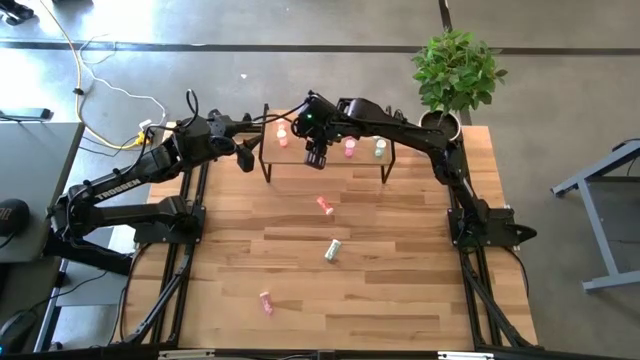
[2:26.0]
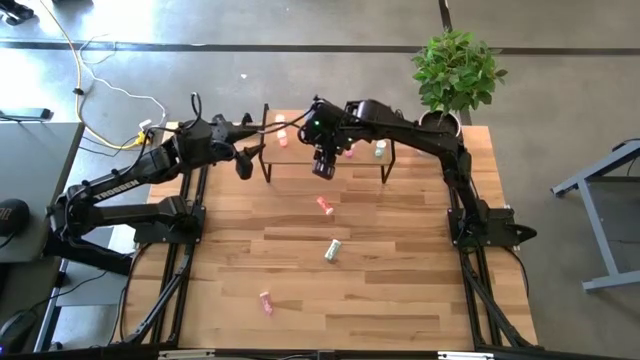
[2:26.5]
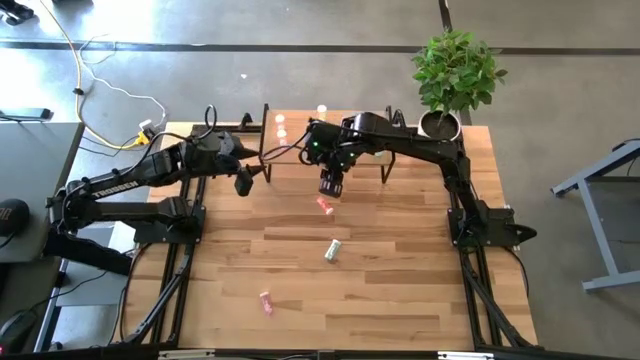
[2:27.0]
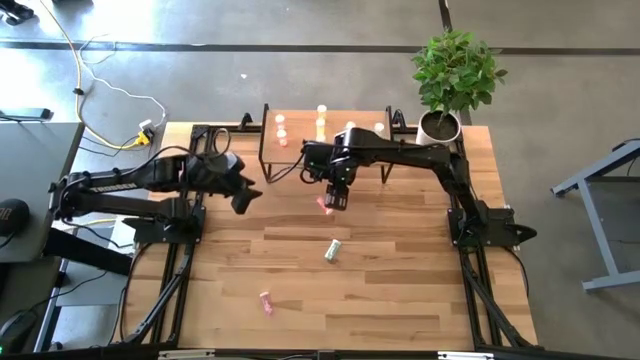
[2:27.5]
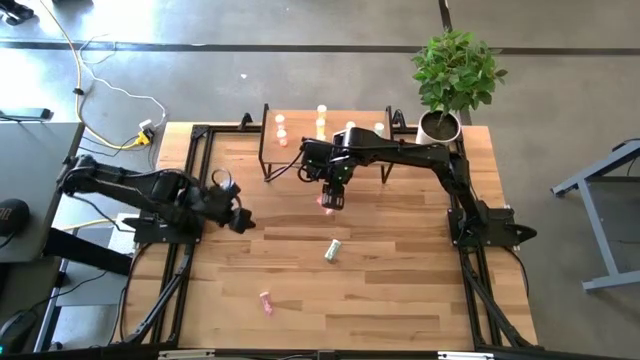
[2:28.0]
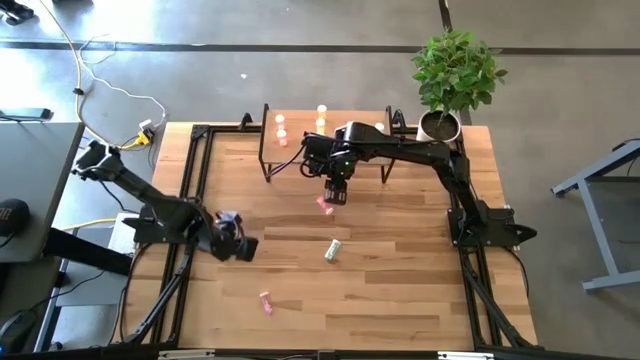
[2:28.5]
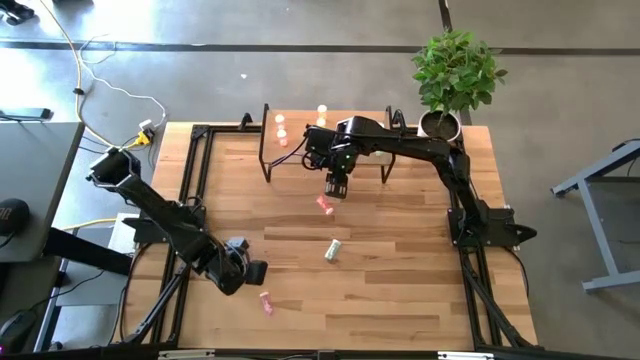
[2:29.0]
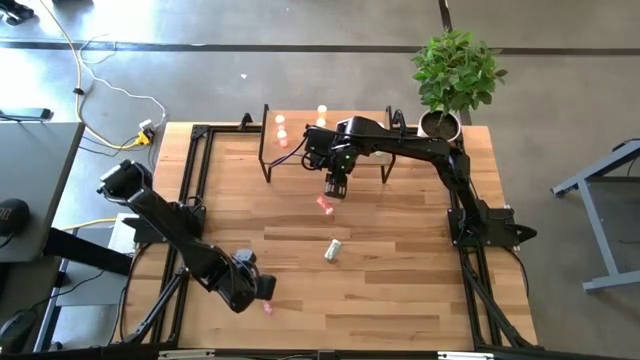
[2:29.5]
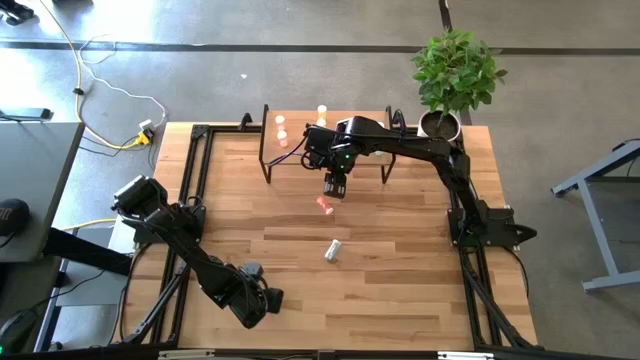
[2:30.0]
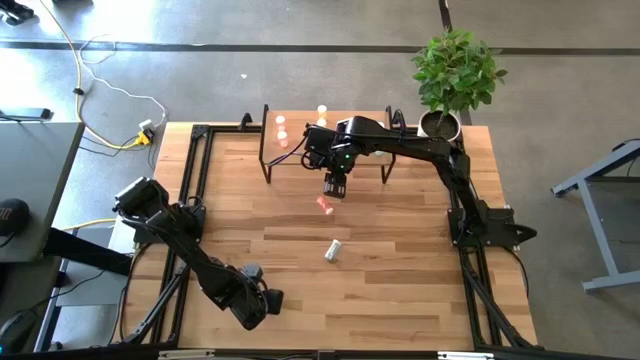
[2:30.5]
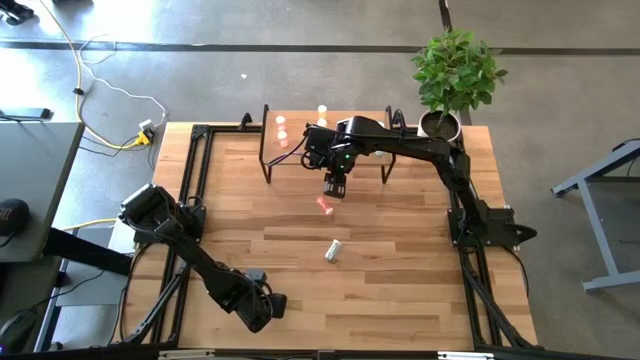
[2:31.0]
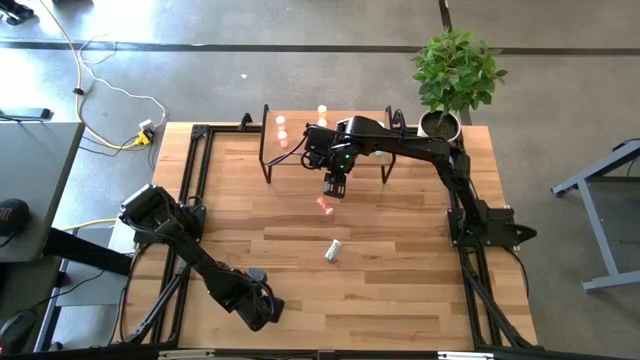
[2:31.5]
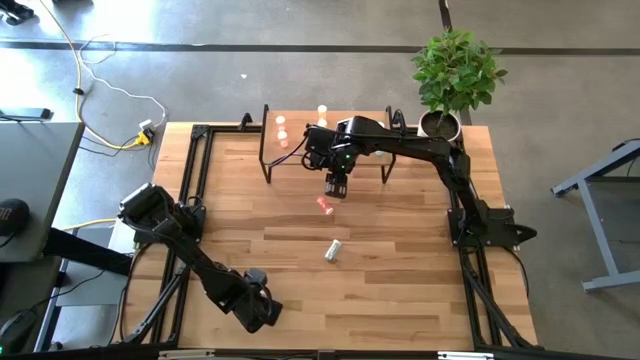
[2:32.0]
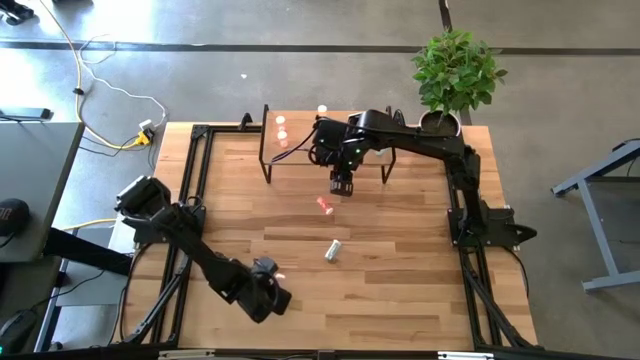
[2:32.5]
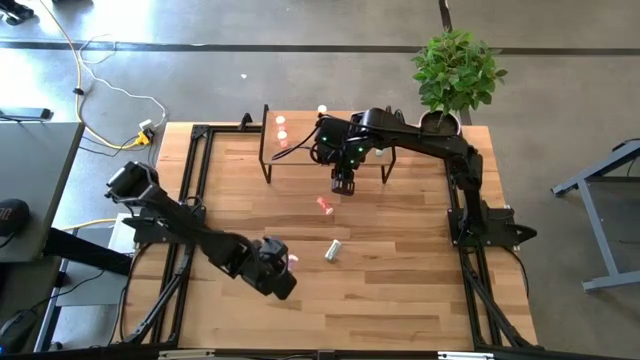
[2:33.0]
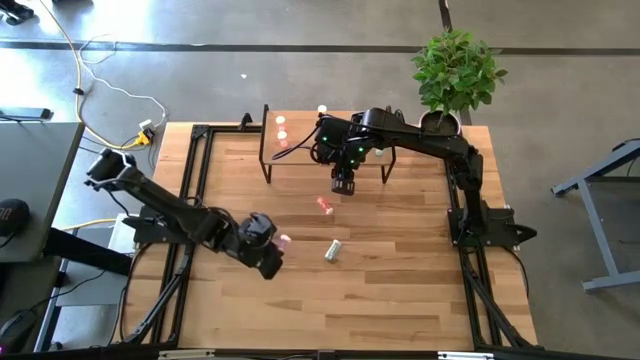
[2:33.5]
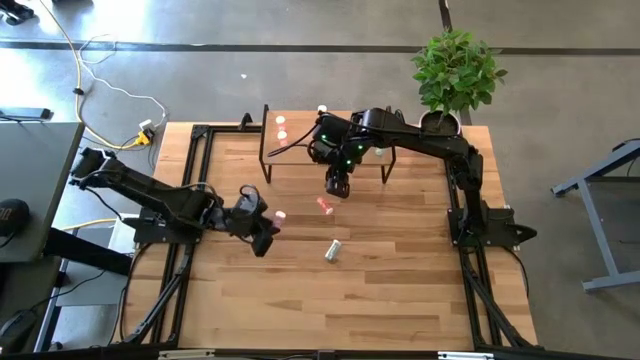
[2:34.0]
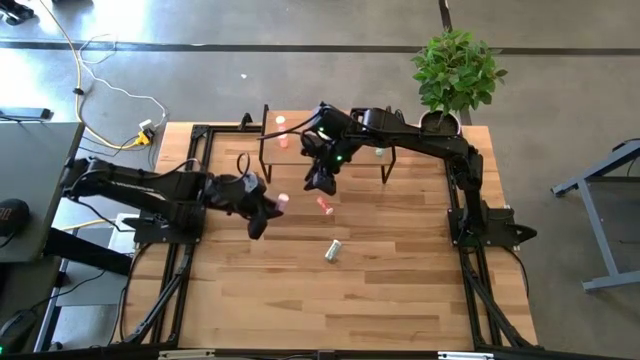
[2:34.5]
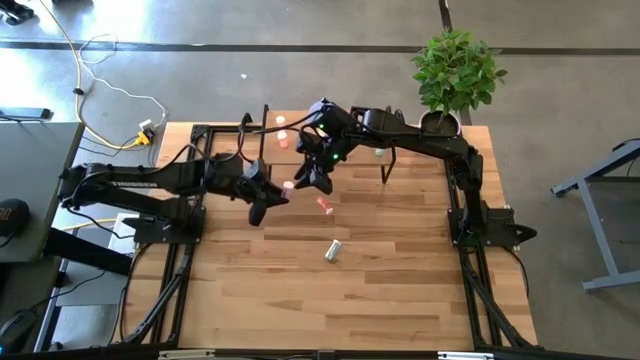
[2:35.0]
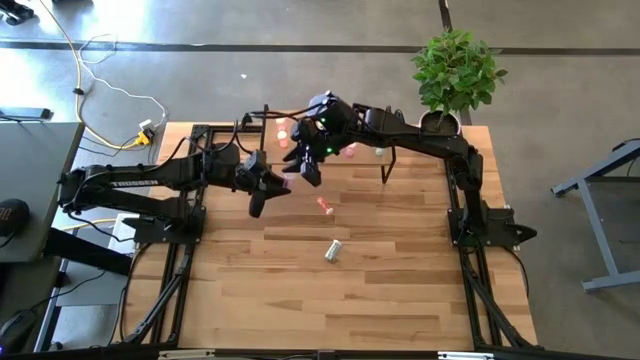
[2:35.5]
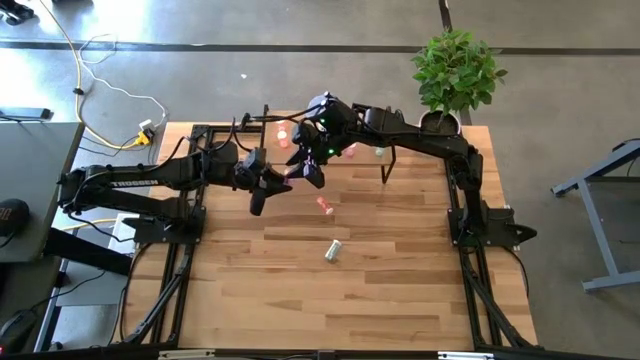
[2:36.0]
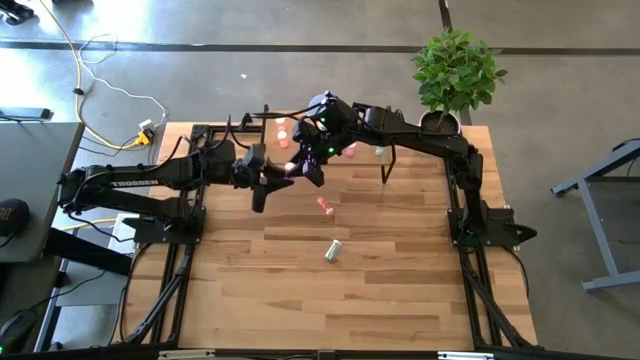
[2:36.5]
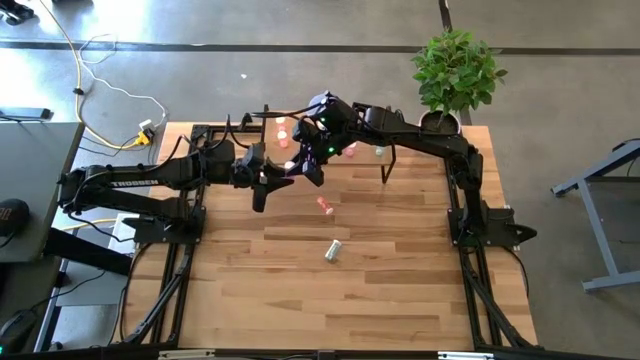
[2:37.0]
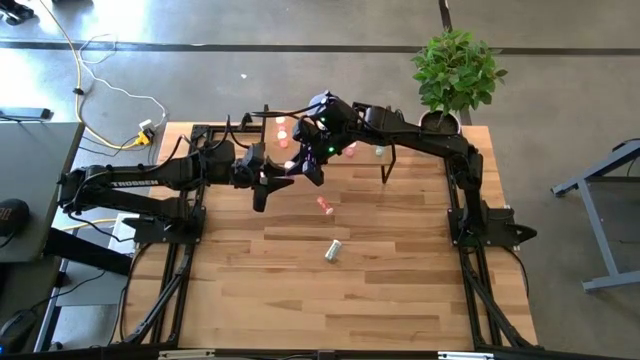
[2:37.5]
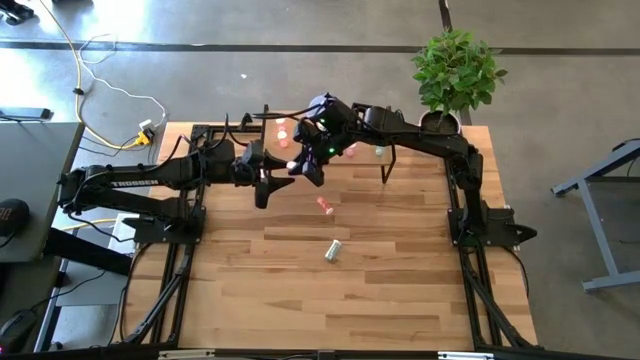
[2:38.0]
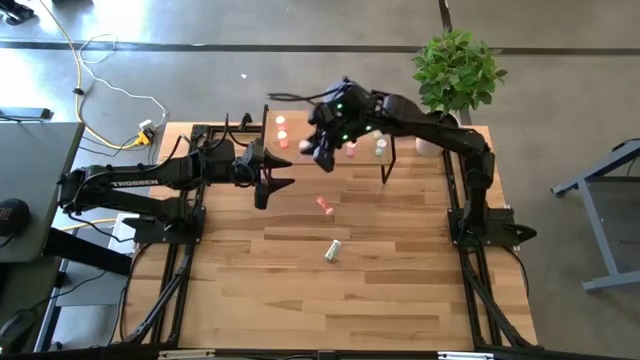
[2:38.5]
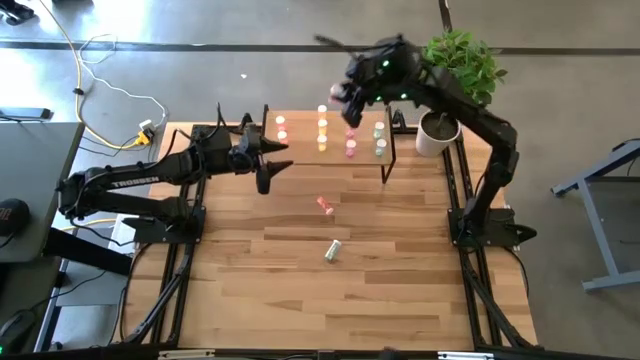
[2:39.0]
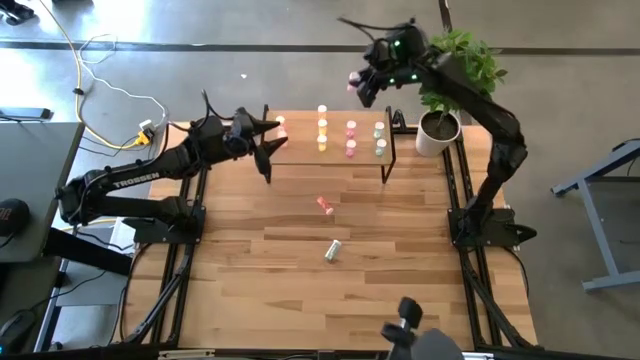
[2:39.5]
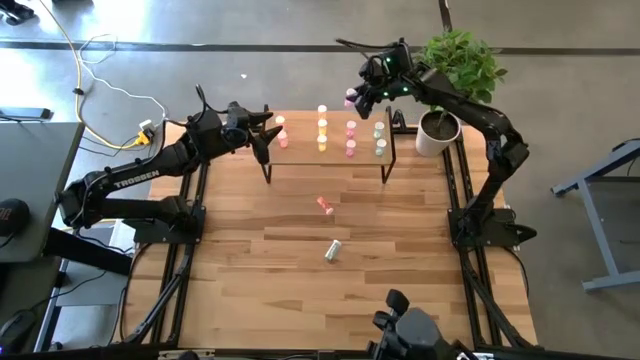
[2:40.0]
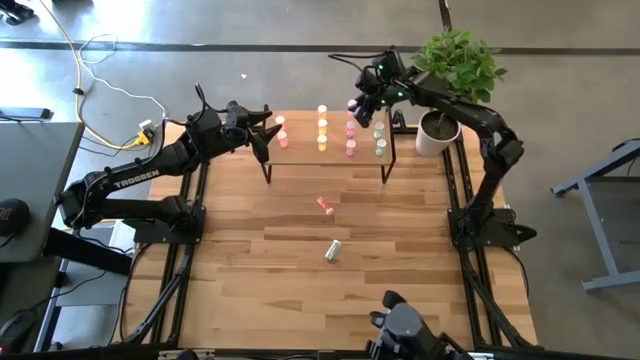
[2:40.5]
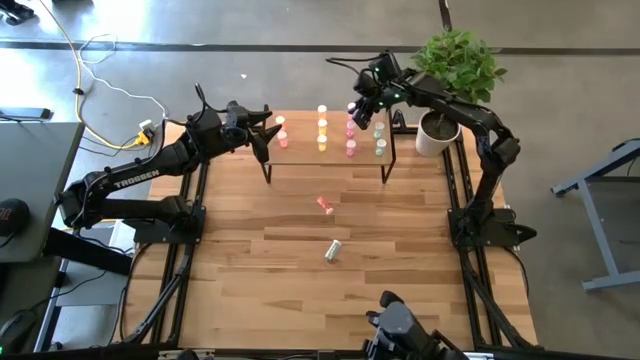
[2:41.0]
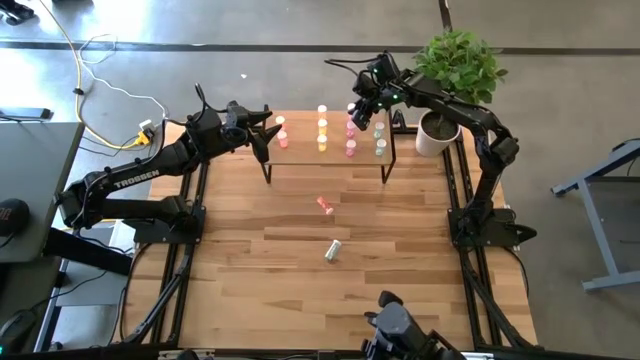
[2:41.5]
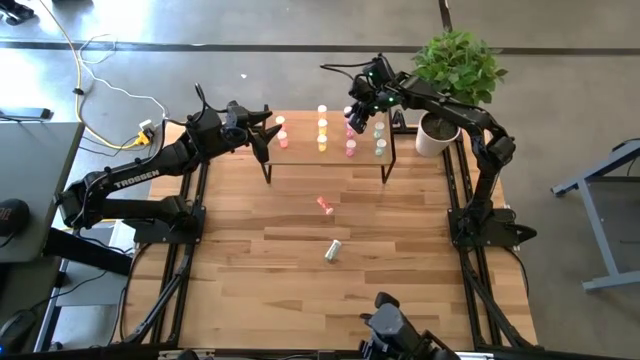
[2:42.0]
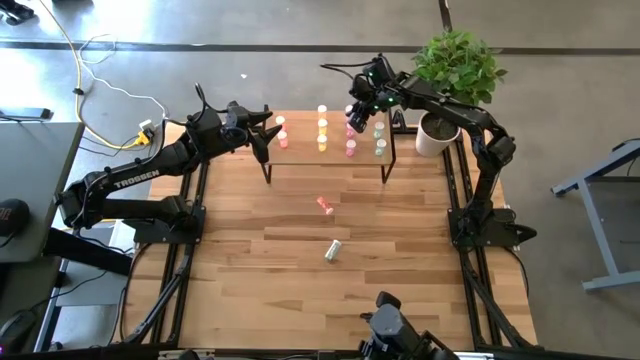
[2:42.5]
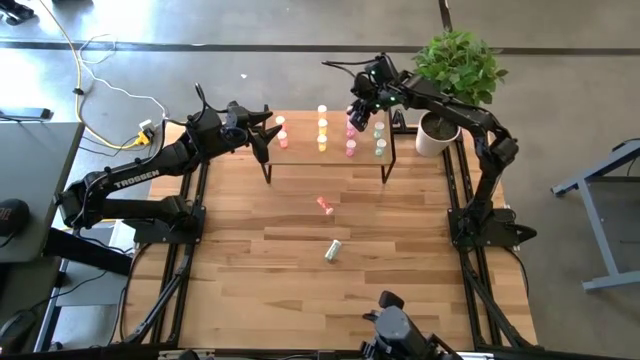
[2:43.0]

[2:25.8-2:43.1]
Task: Pick and place medicine bottles onto shelf by color
Put the purple pill bottle on the shelf aligned with the purple pill bottles

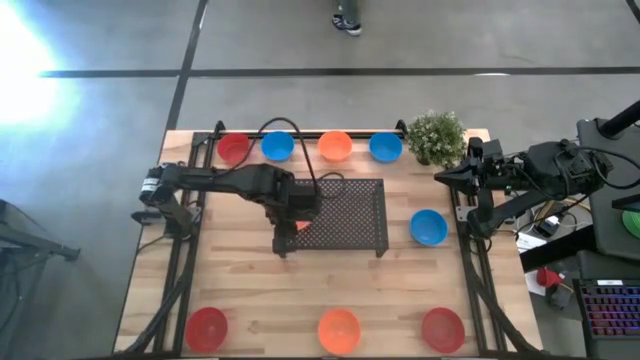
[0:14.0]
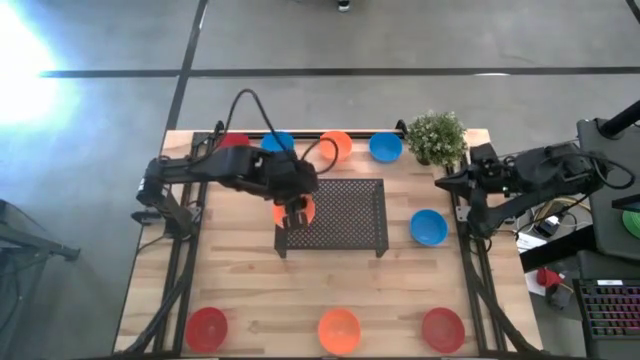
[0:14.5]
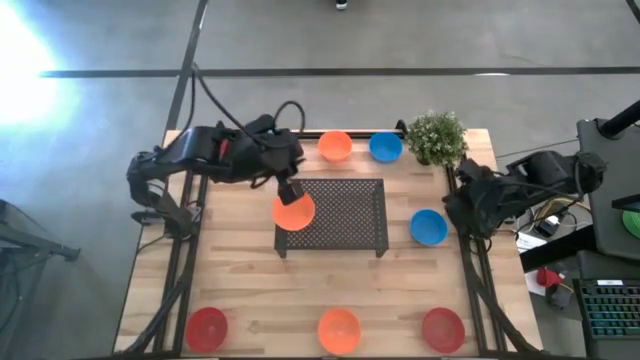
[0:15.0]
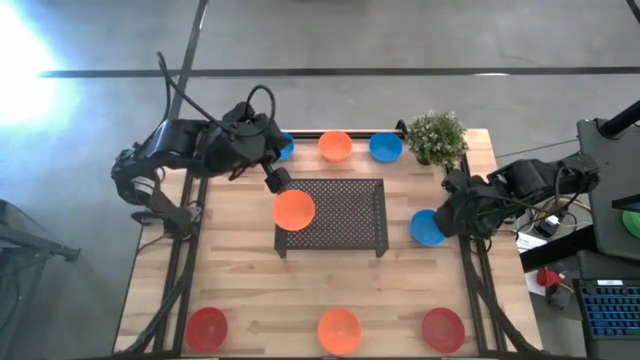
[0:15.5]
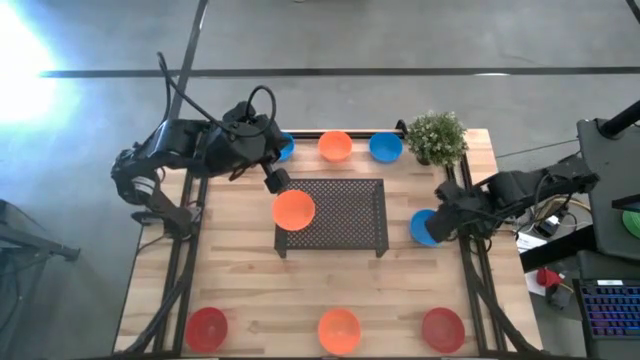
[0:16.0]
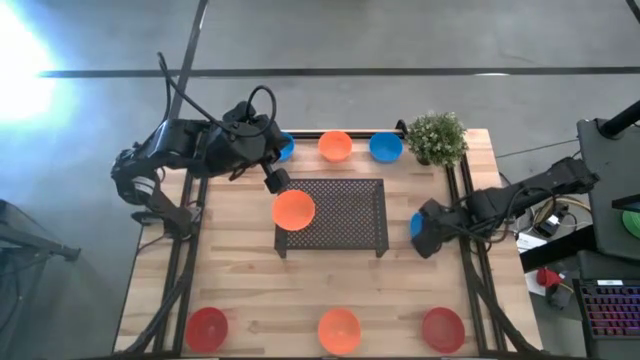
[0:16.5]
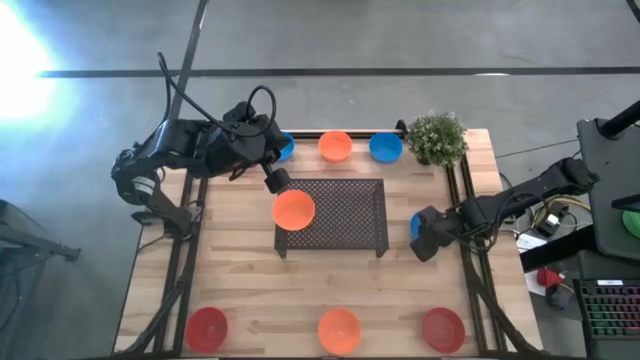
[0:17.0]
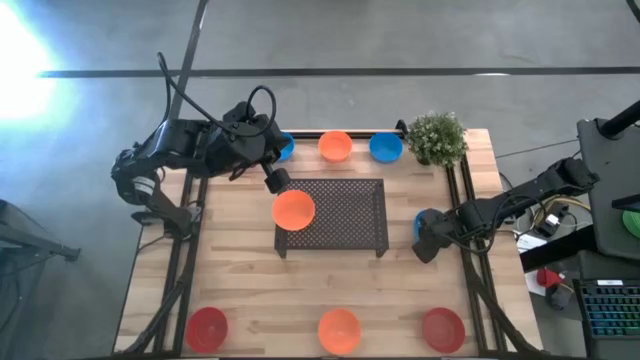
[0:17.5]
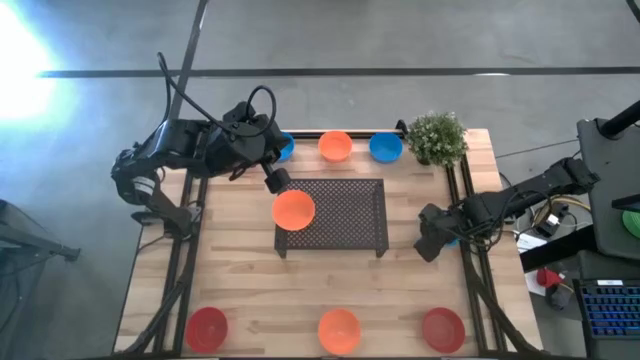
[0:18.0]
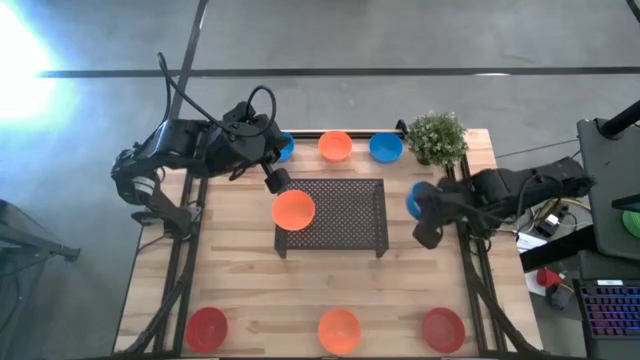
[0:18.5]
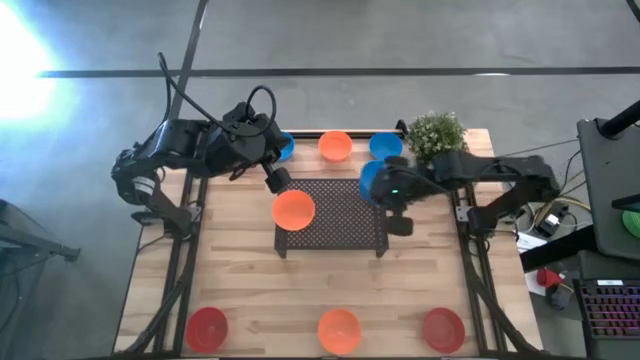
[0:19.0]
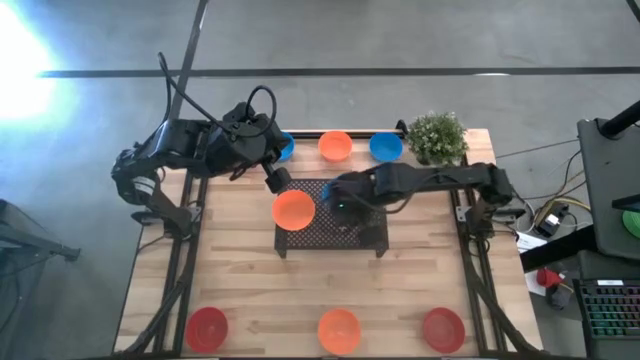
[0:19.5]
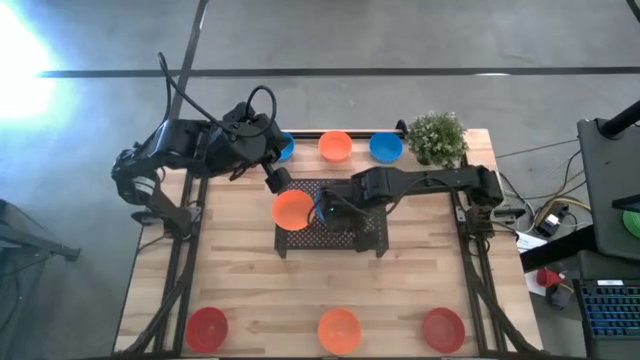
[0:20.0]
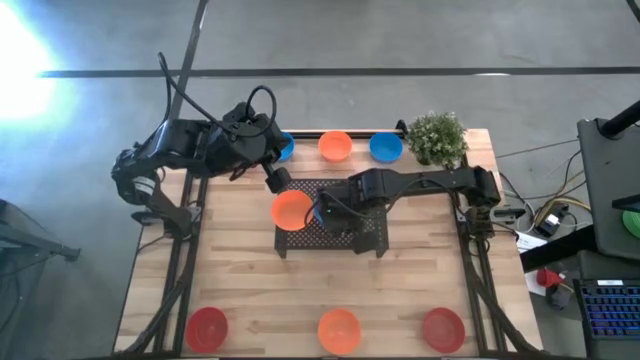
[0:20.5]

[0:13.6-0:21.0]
Task: Pick & Place Mini bowls
Put the right blue bowl on the shelf
